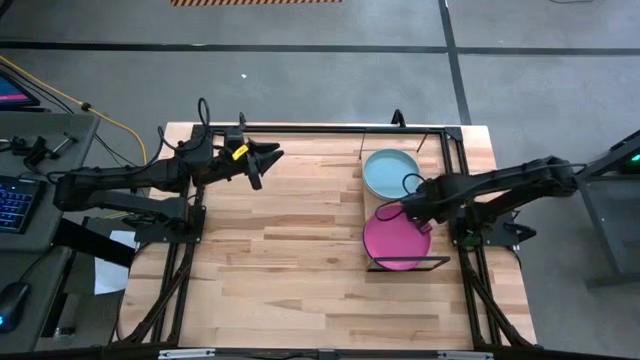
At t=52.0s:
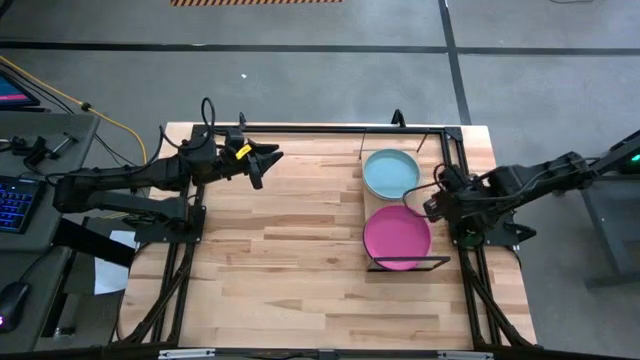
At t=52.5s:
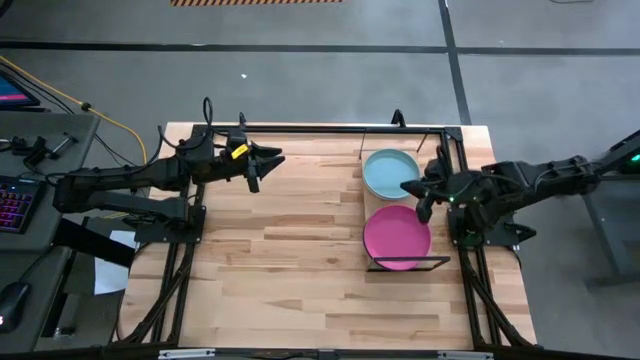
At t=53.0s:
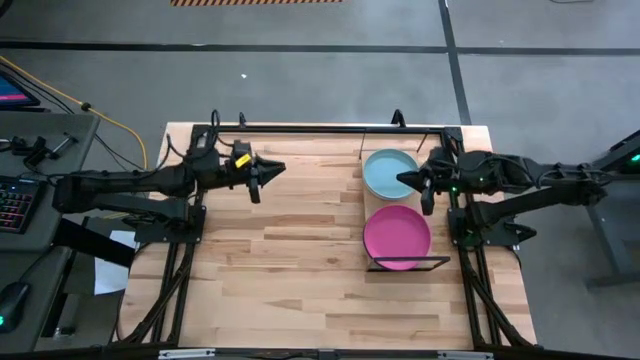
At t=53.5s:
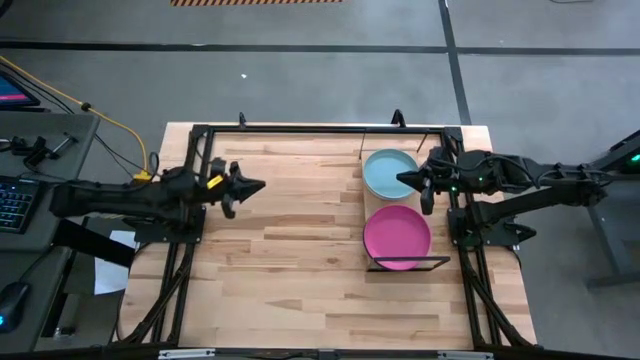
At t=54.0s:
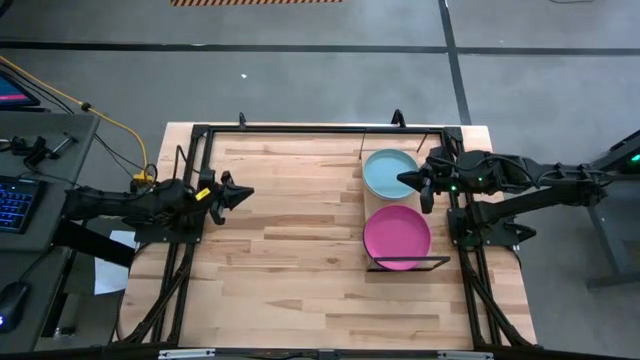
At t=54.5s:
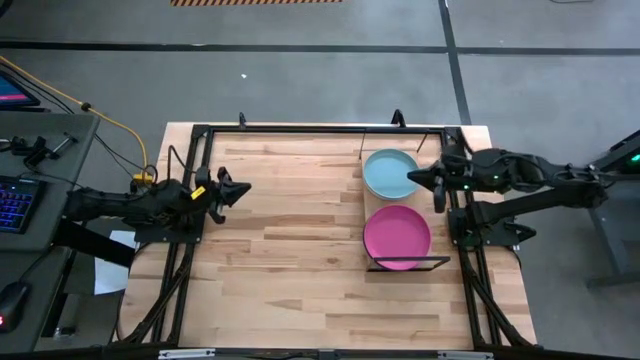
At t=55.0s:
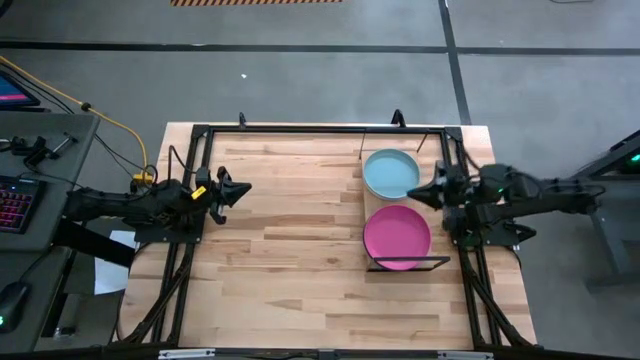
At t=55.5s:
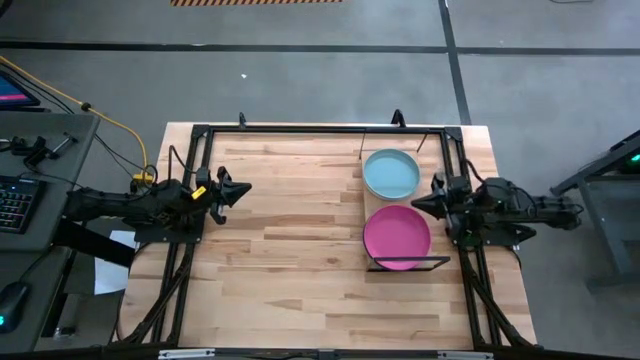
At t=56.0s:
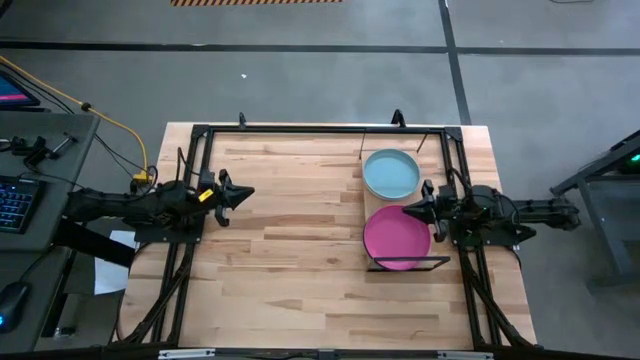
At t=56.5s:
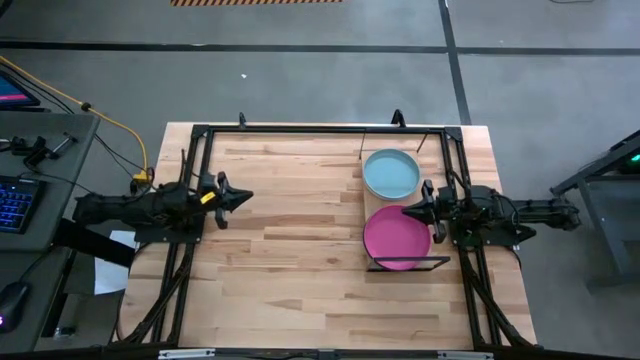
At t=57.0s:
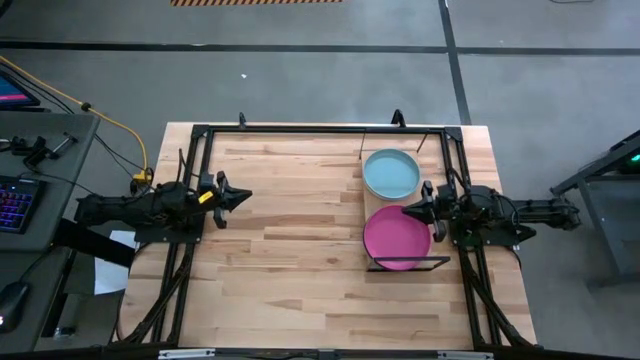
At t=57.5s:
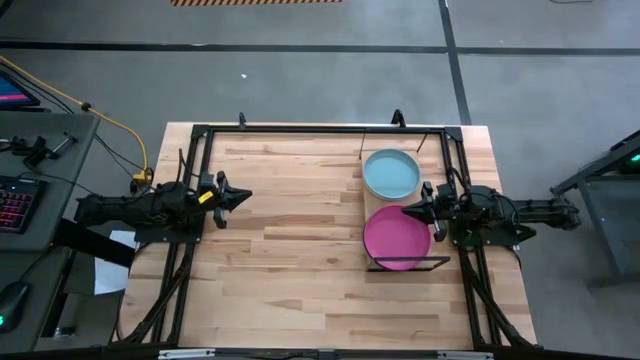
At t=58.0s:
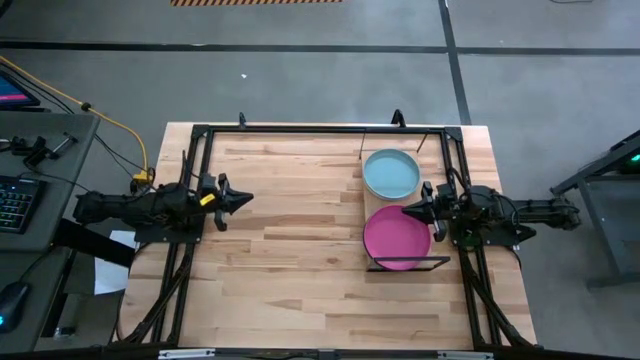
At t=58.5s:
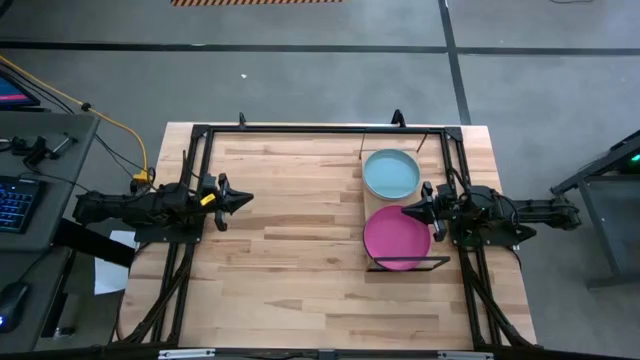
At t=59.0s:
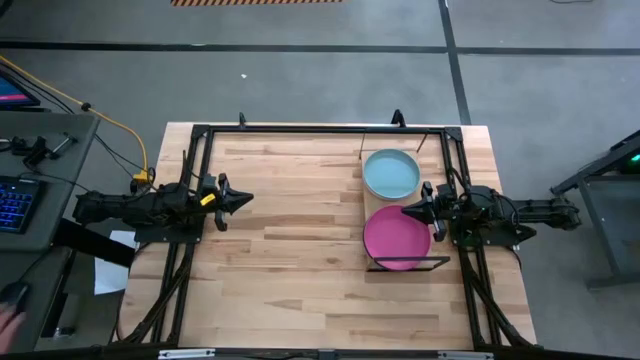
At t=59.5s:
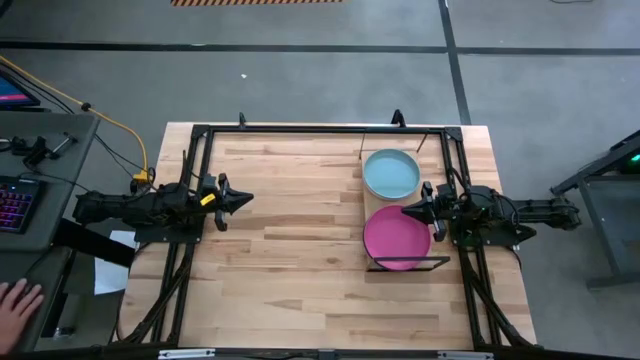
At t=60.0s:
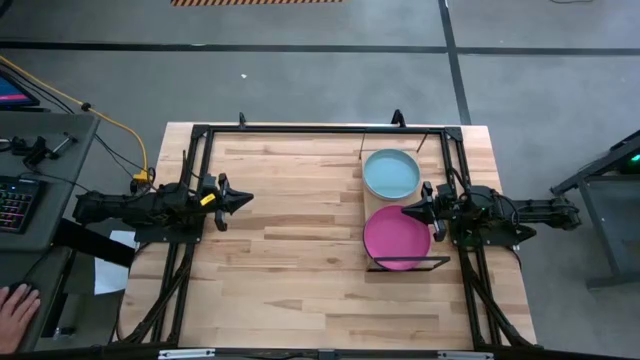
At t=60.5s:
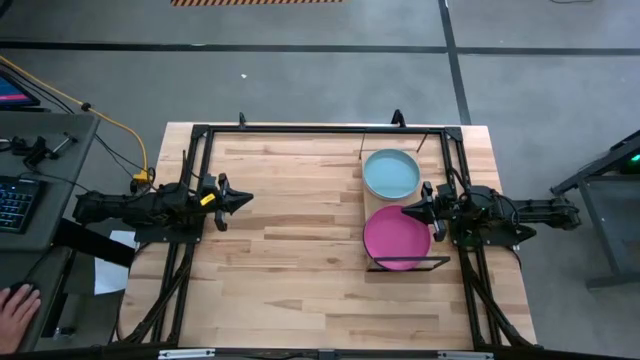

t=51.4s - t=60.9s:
Task: Place and stack plates onto a shelf
Return to Home Position

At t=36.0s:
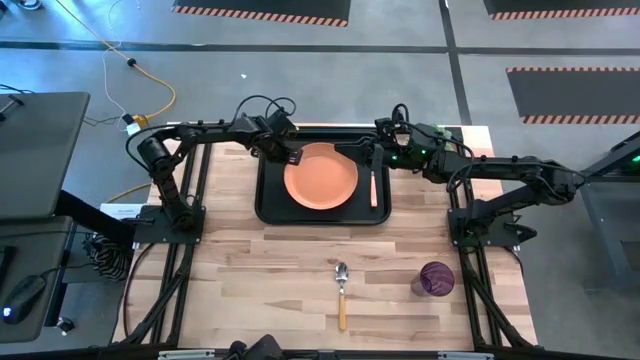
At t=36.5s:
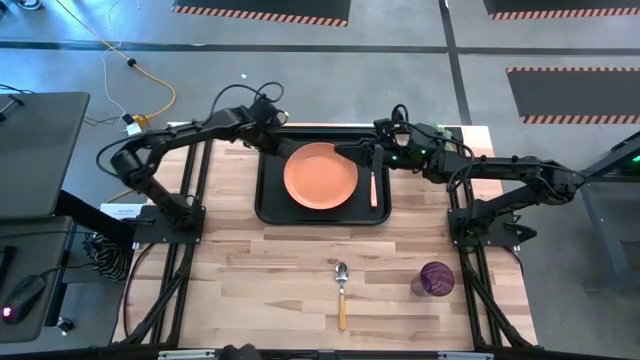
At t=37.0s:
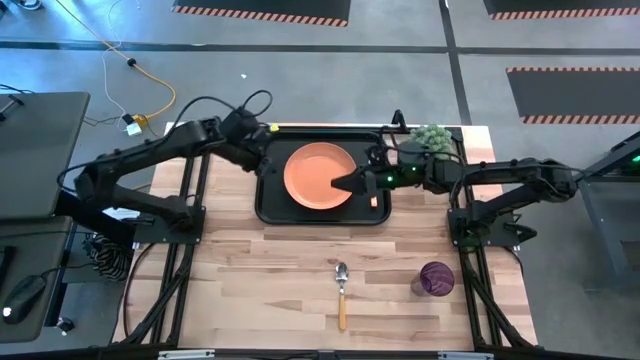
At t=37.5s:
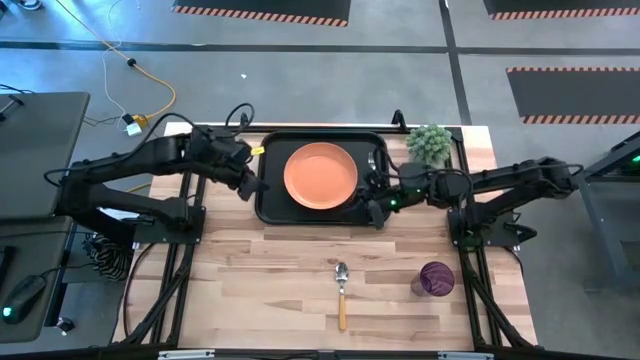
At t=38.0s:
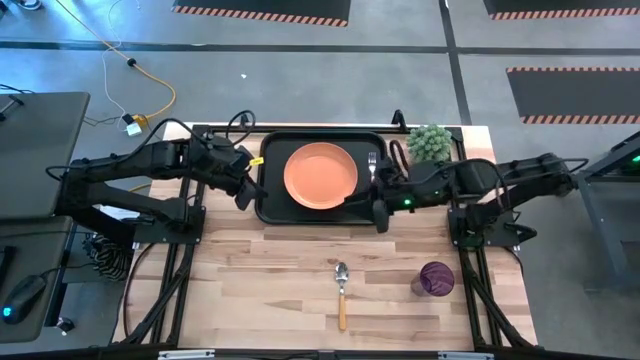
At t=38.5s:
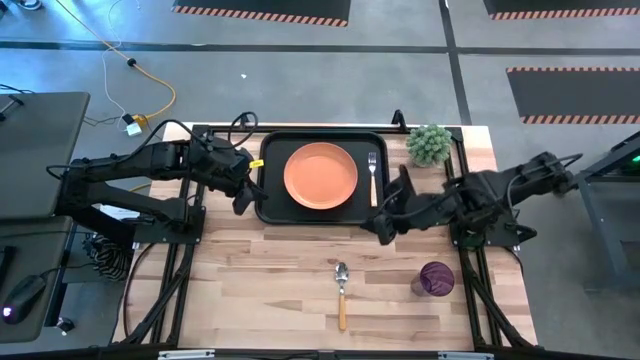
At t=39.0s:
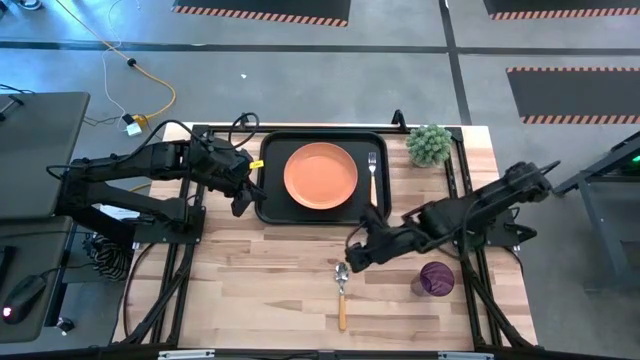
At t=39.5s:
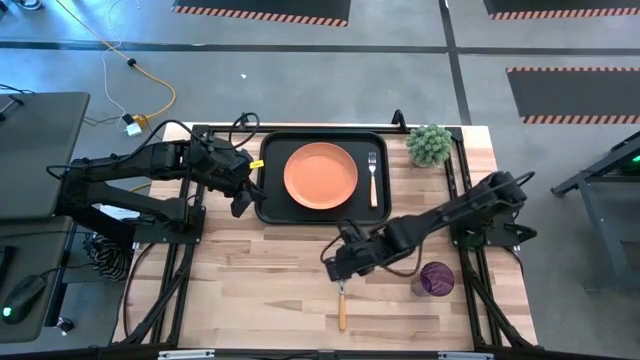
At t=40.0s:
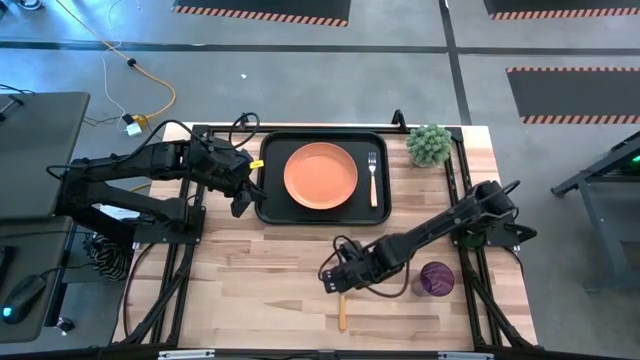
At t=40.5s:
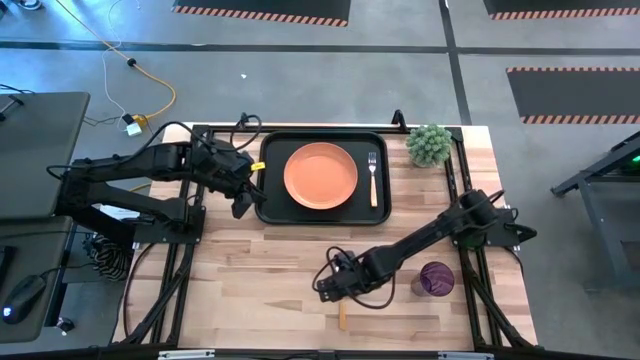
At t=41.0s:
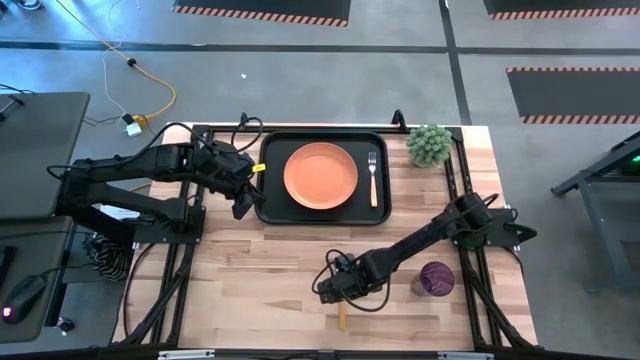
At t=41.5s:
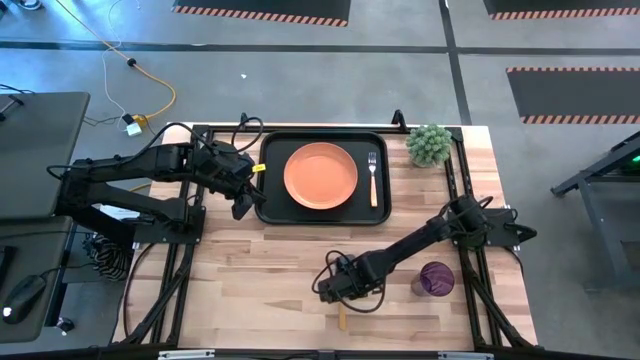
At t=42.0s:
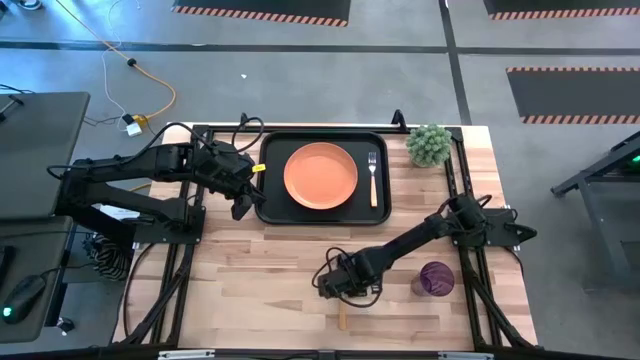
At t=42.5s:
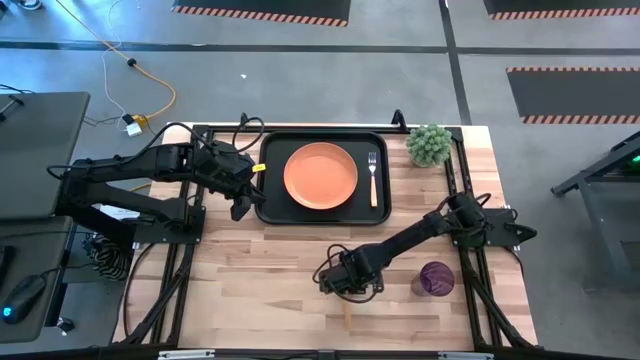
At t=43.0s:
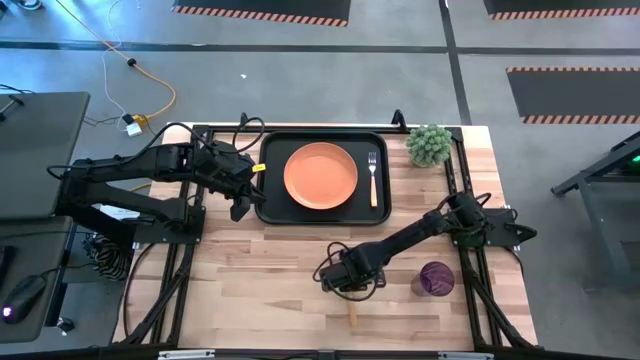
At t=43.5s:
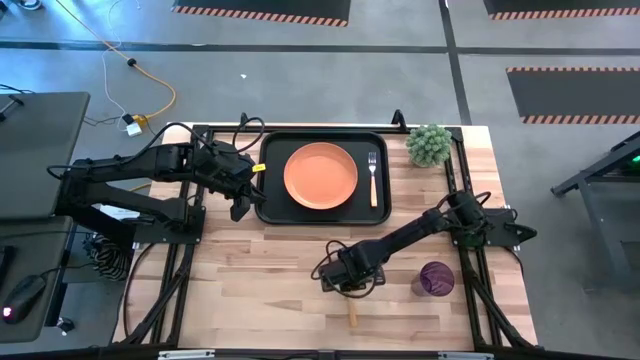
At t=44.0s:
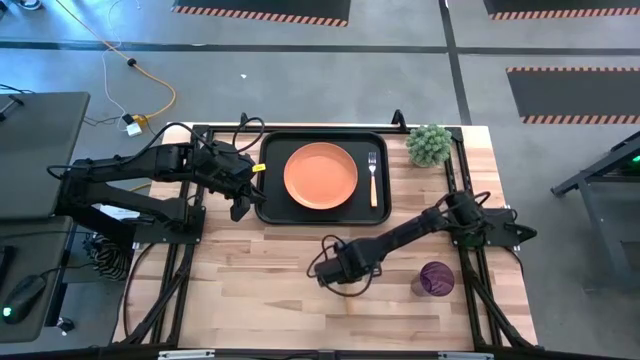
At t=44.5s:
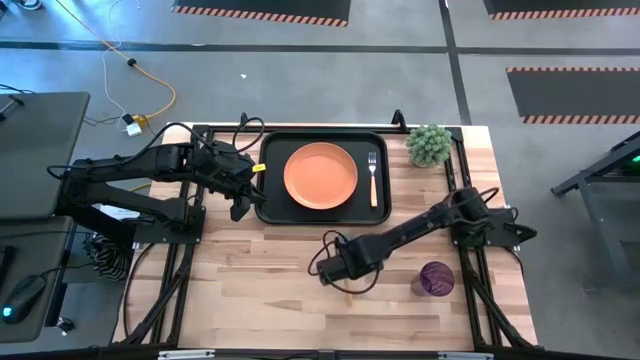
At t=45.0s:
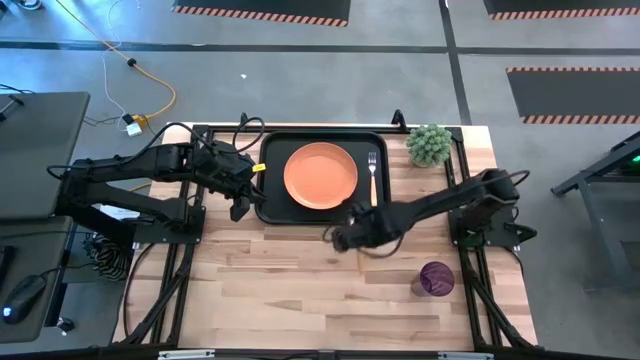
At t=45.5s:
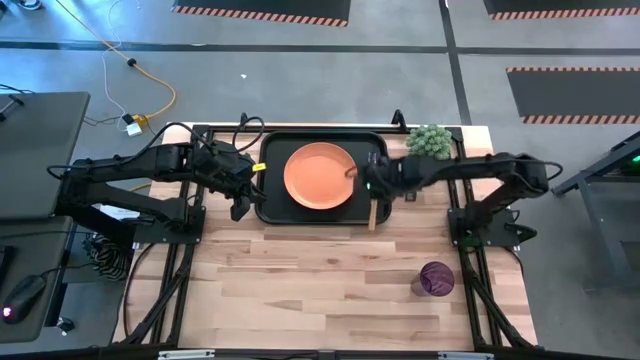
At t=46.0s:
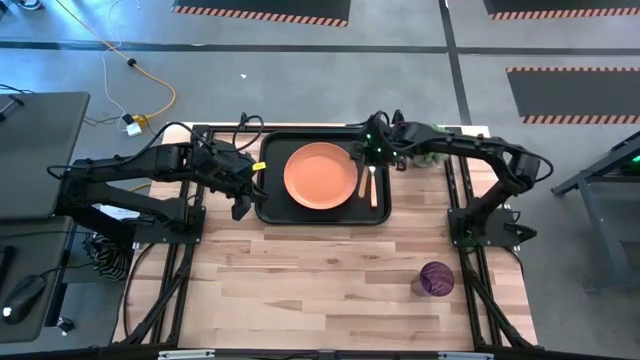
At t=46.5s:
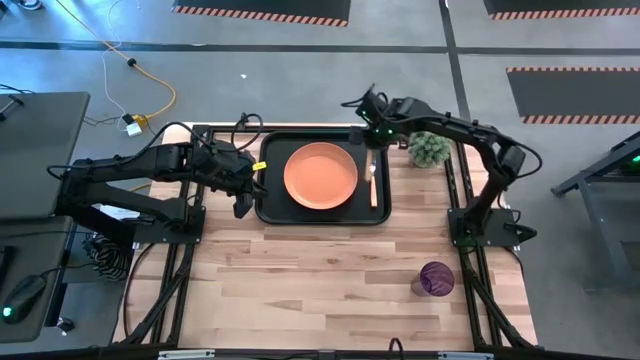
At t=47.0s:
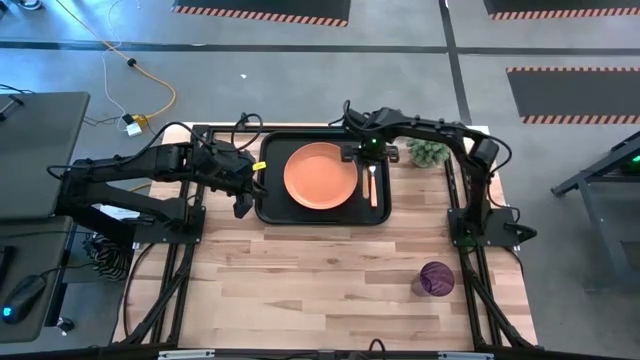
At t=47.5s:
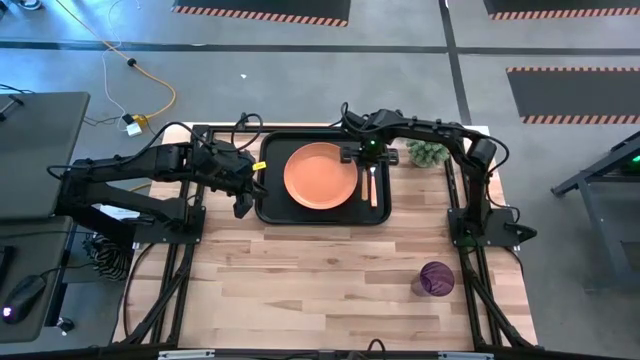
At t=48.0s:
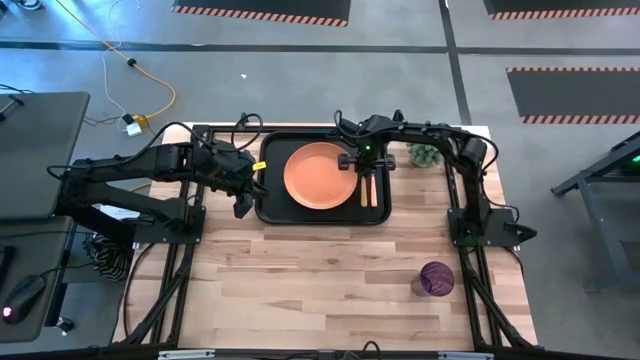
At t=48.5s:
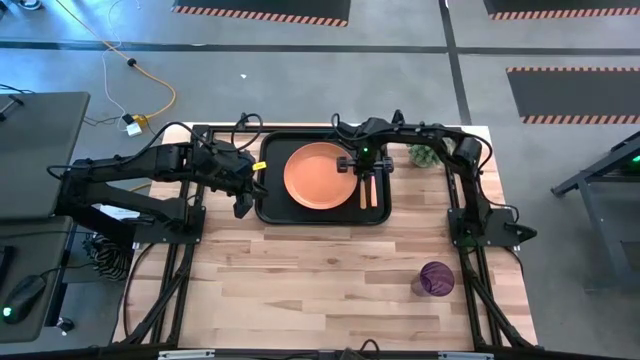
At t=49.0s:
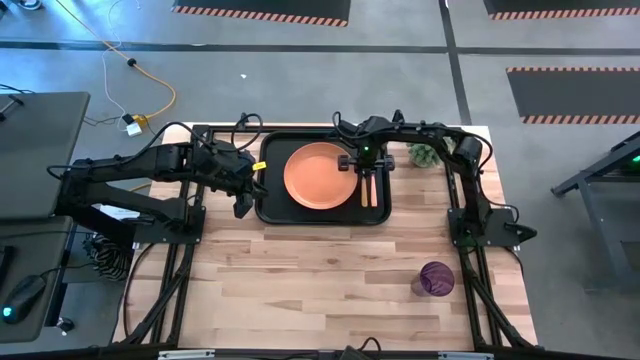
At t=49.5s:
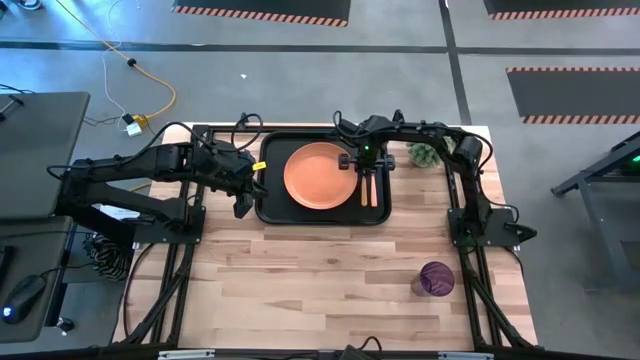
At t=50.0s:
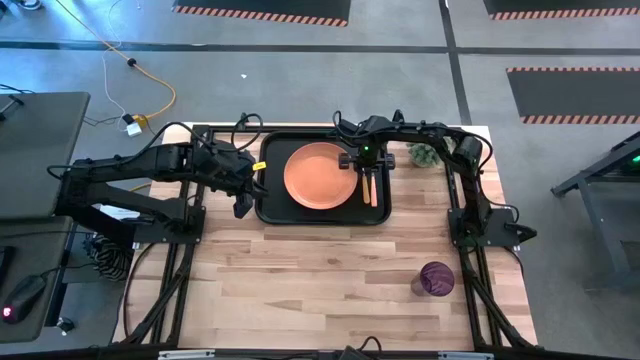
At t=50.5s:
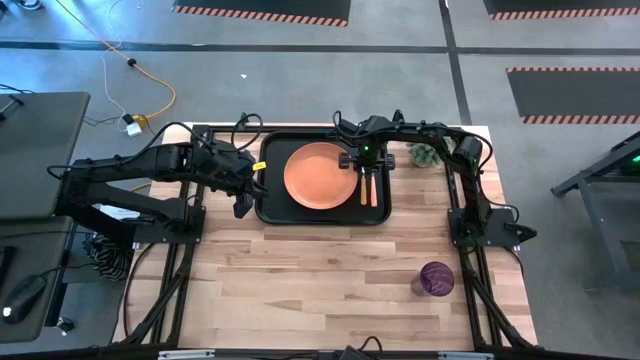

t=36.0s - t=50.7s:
Task: Pick and place plate/cup/fork/spoon on tray
Put the yellow spoon on the black serving tray to the left of the light orange fork
